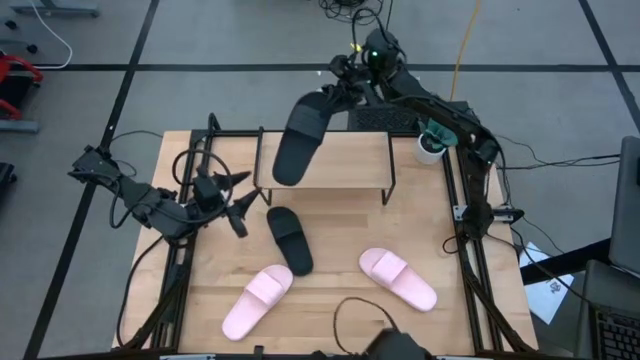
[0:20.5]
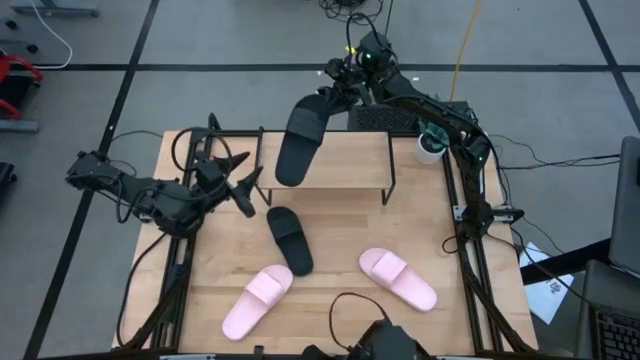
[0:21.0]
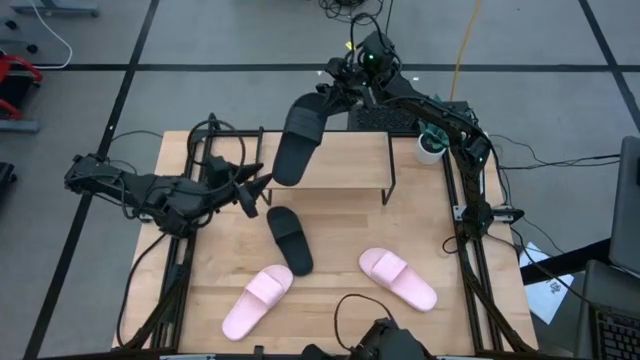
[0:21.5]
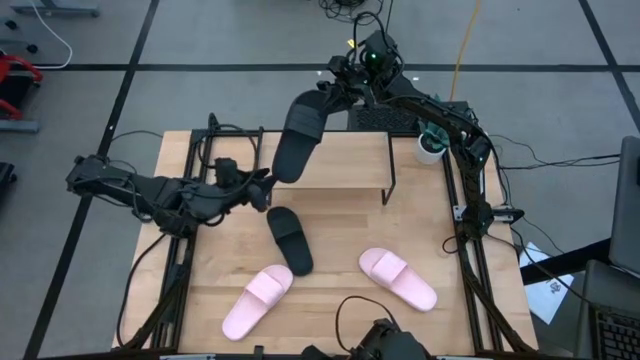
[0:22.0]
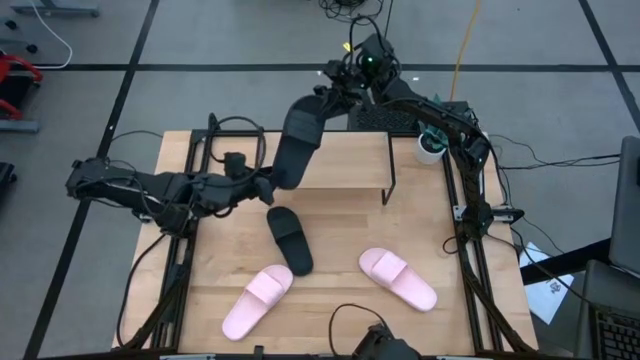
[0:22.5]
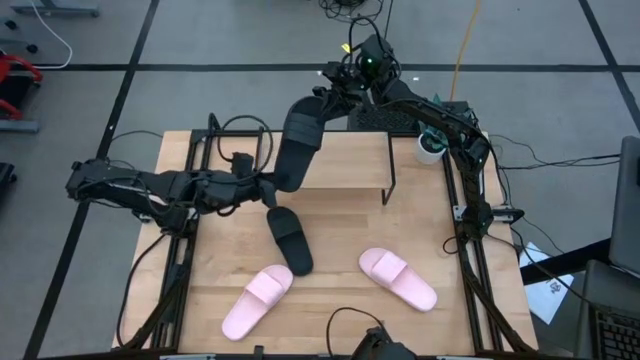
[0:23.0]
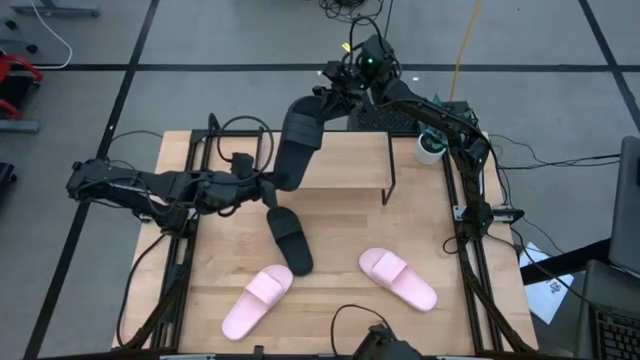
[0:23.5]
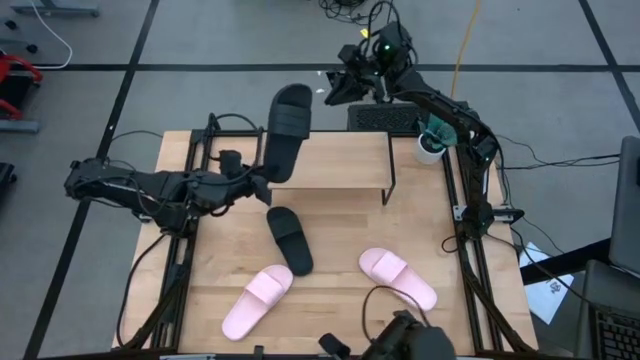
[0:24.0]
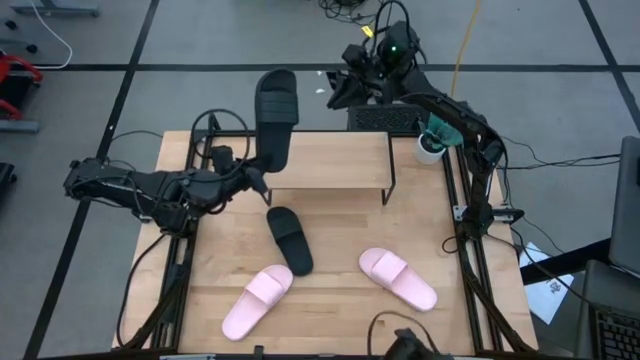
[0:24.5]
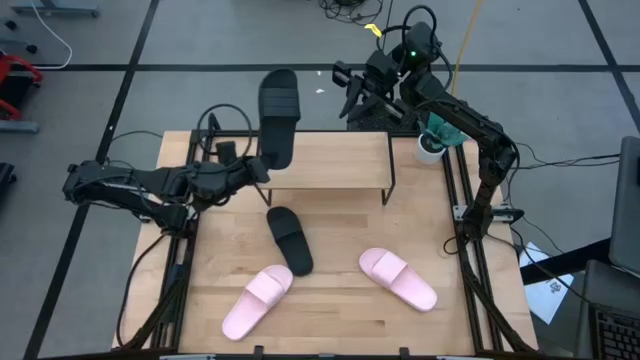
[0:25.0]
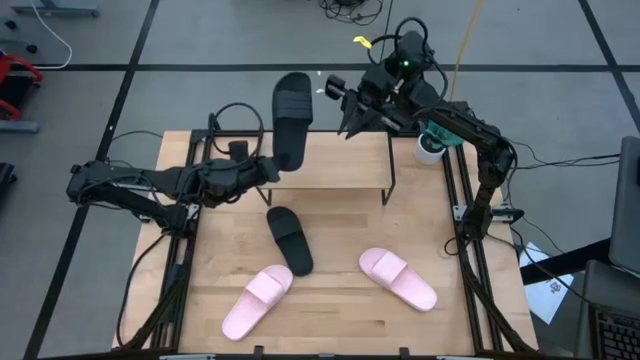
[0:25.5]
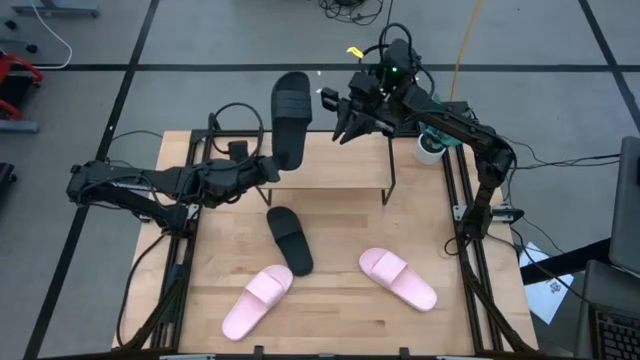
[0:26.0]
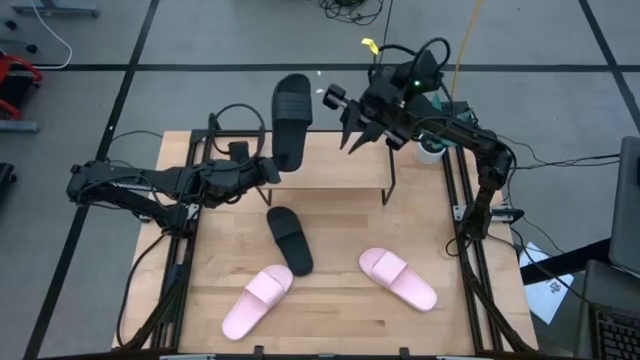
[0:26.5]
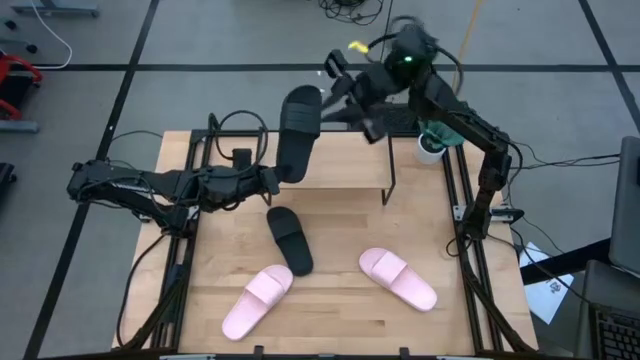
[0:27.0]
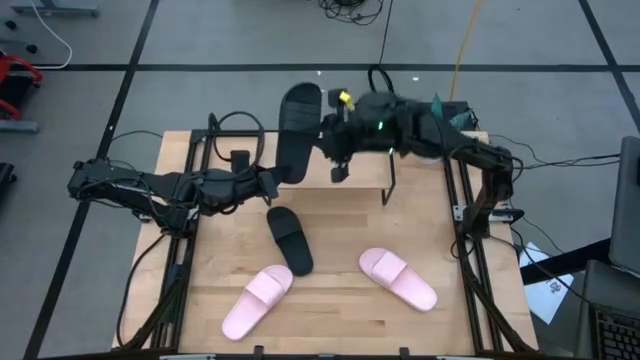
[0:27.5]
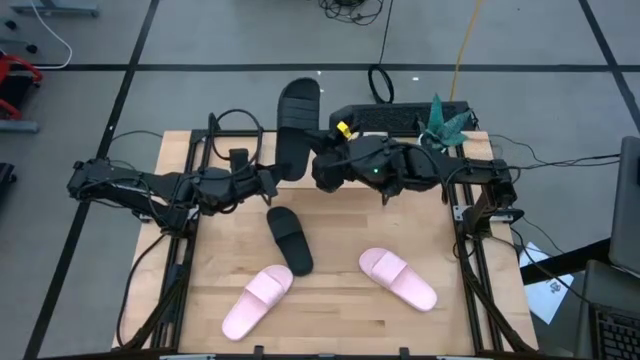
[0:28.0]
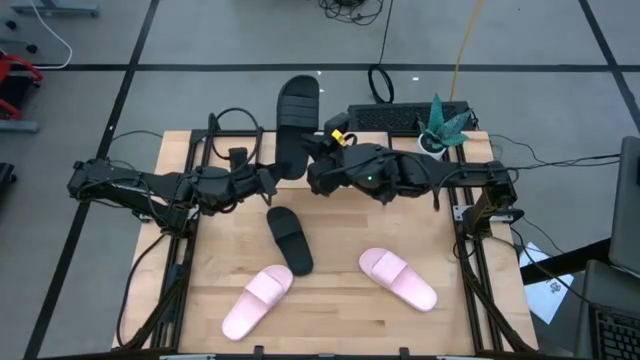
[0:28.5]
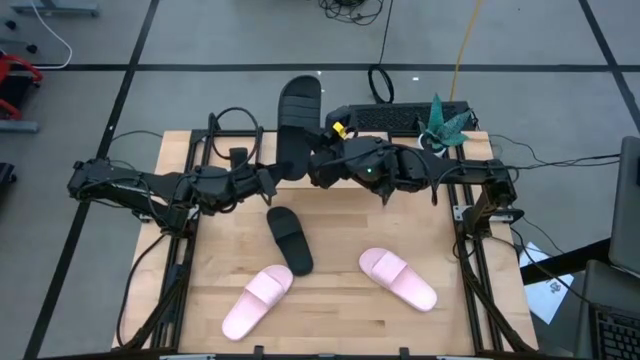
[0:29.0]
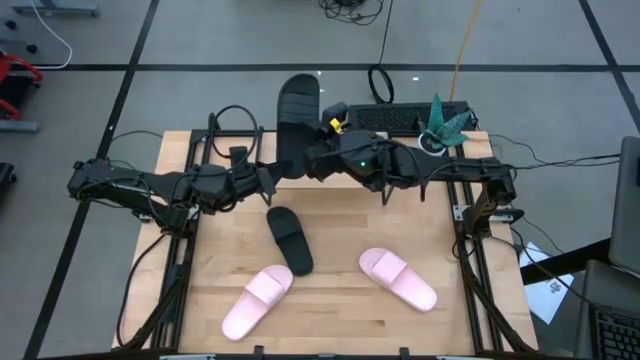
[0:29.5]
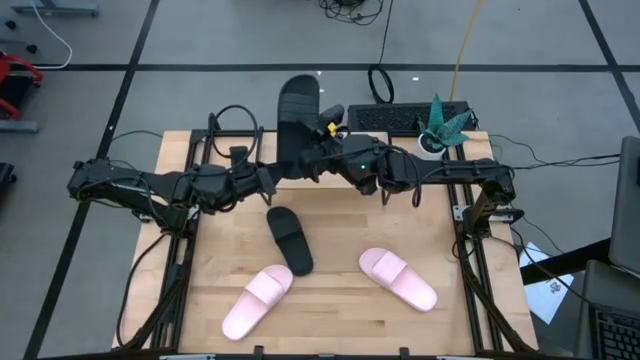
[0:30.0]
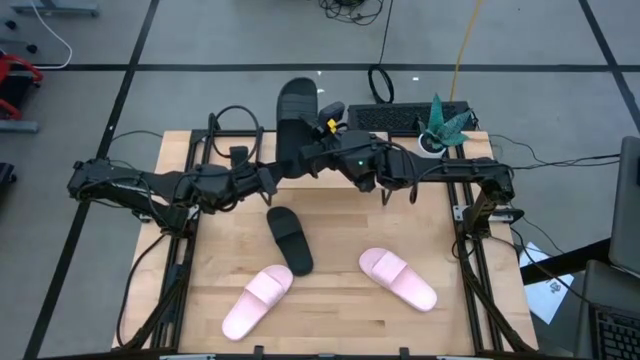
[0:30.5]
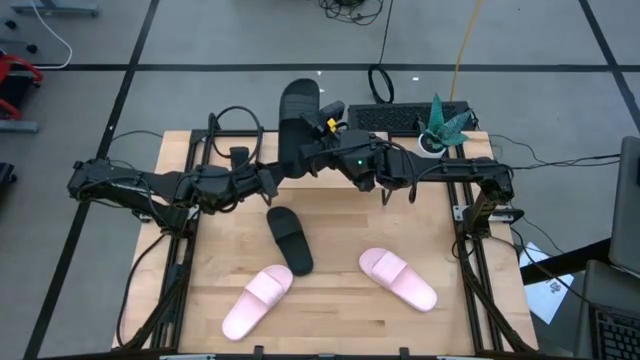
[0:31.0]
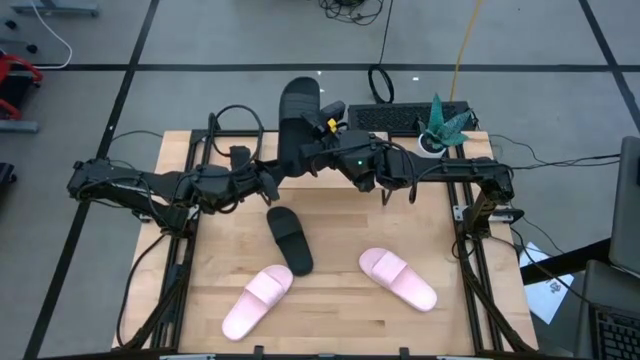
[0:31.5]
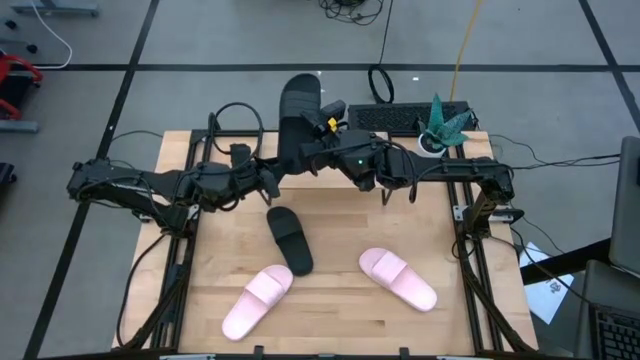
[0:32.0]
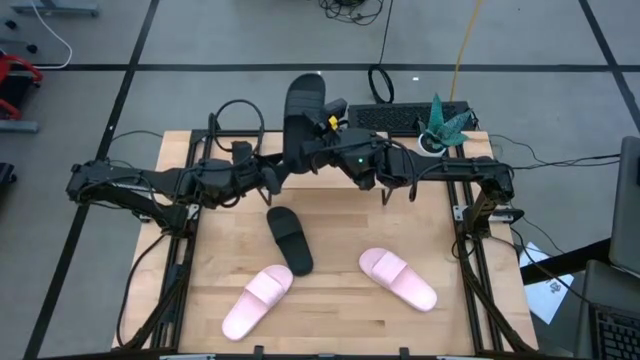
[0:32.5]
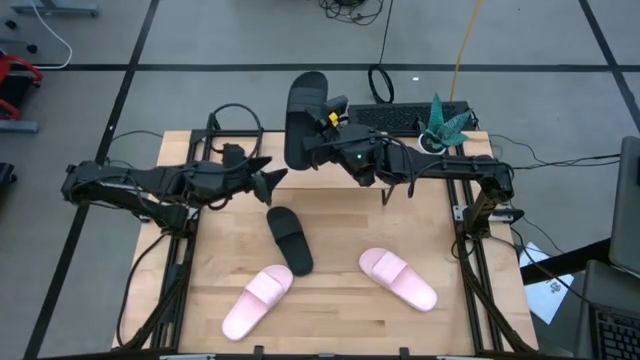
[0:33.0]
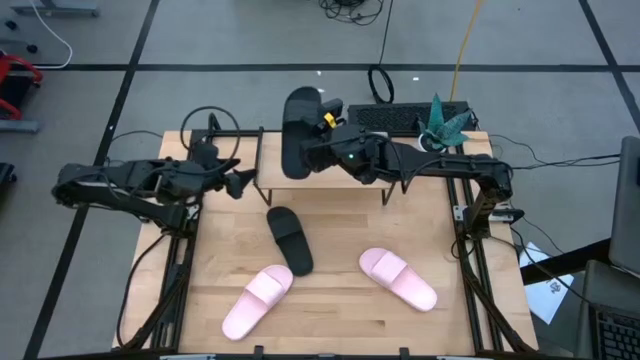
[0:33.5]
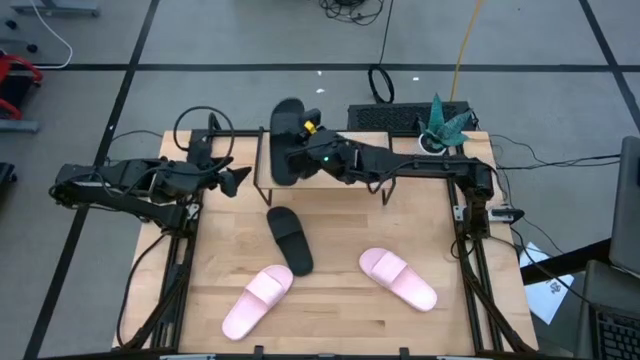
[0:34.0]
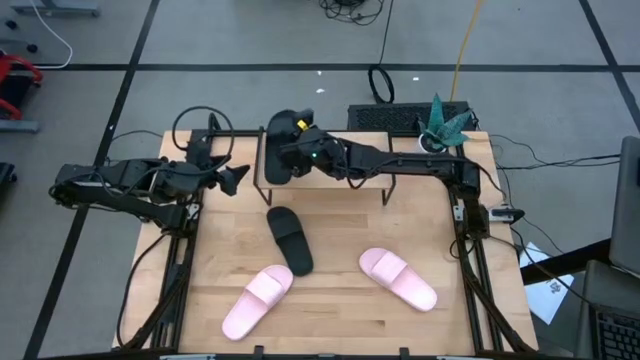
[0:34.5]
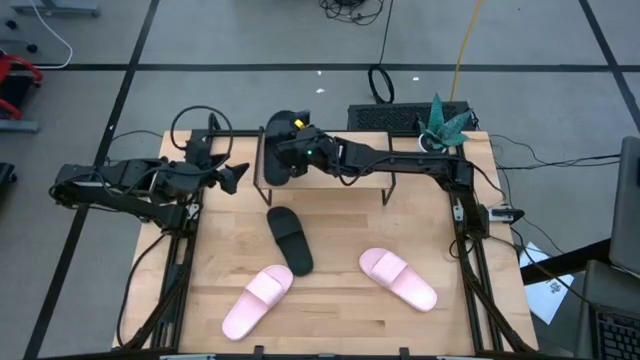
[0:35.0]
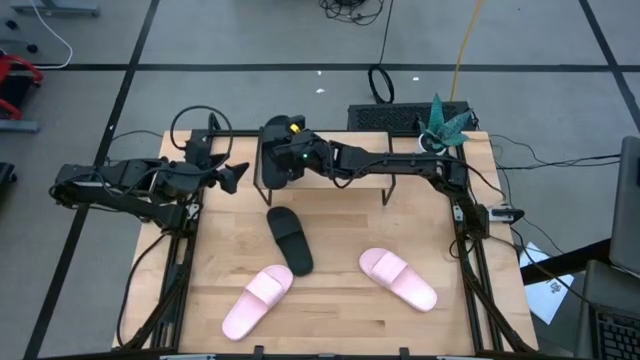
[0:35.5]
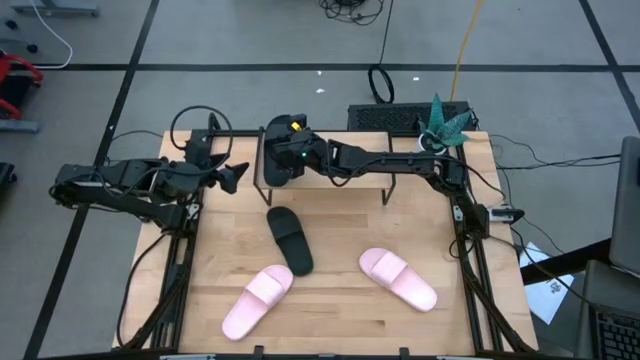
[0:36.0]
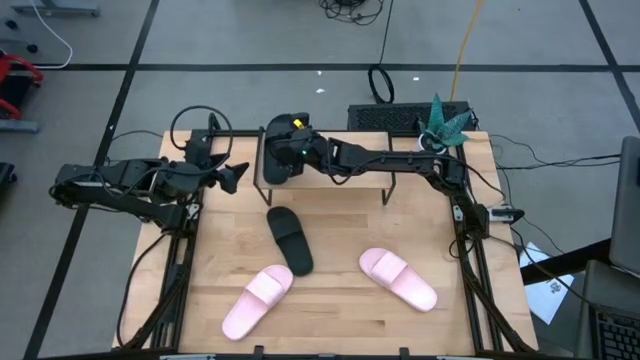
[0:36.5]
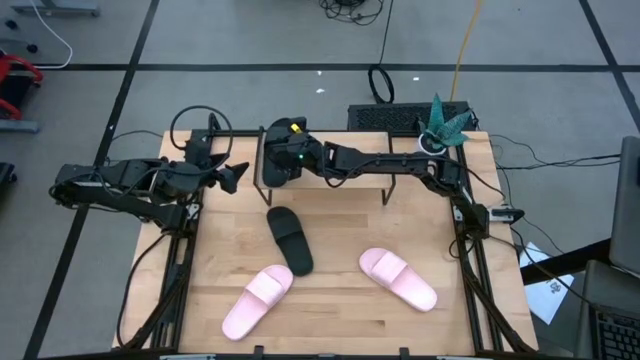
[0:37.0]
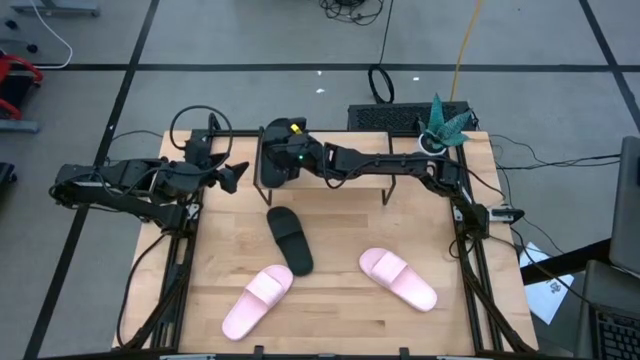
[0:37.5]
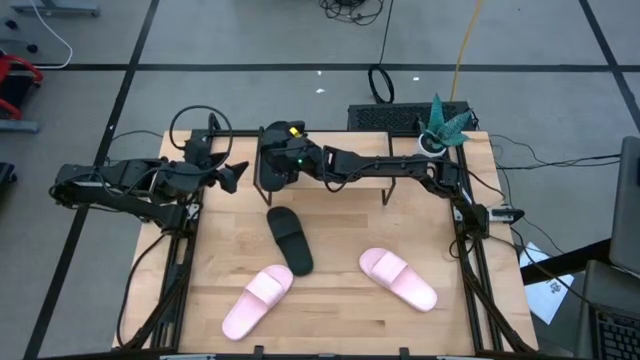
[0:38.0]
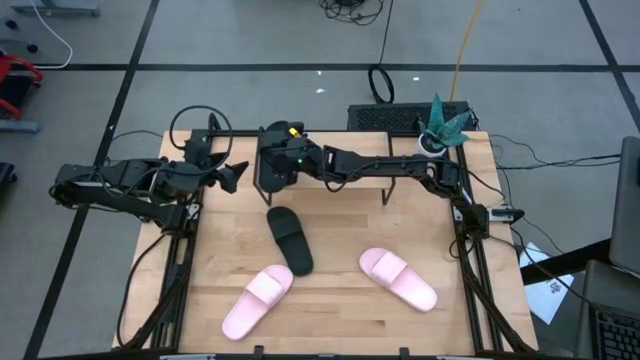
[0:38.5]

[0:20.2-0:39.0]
Task: Pick and place slides into the shelf
Put the right black slipper on the shelf

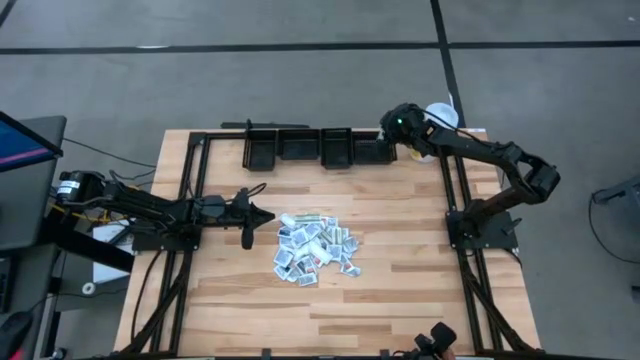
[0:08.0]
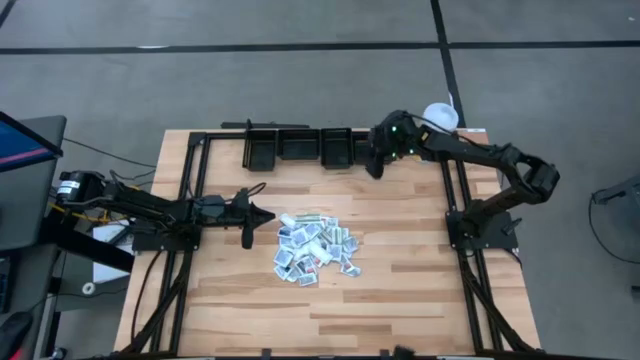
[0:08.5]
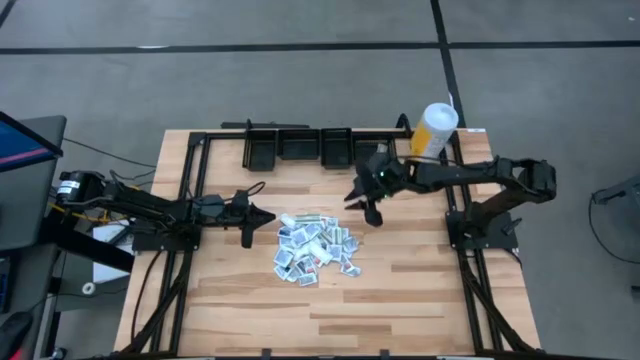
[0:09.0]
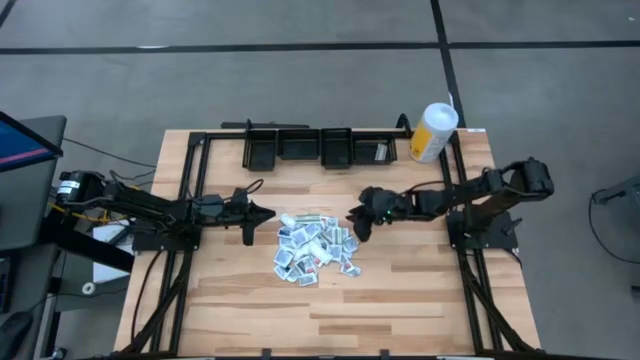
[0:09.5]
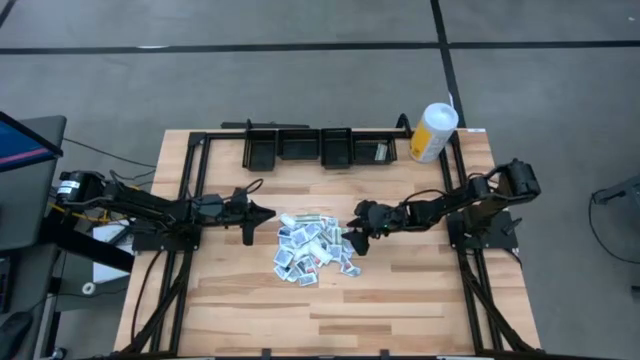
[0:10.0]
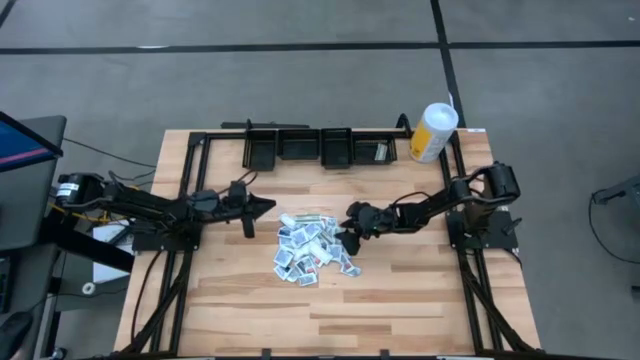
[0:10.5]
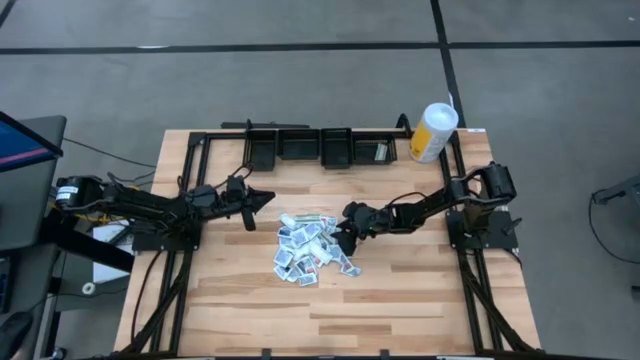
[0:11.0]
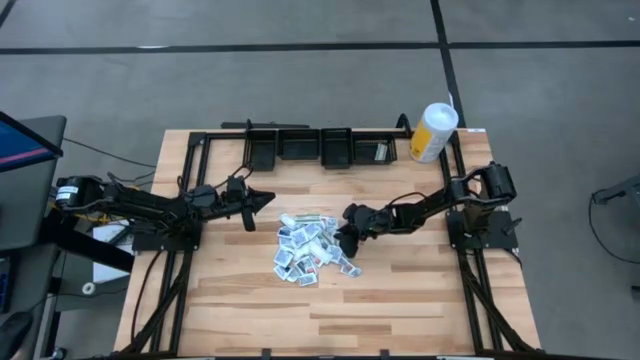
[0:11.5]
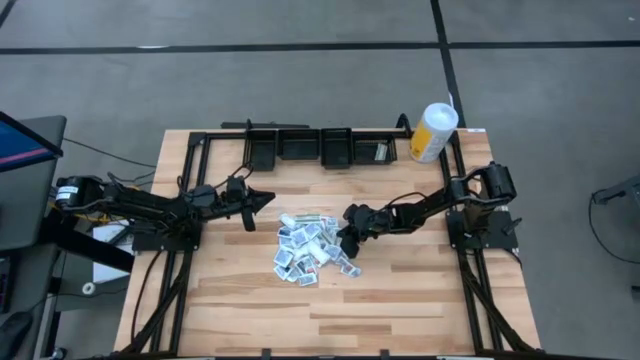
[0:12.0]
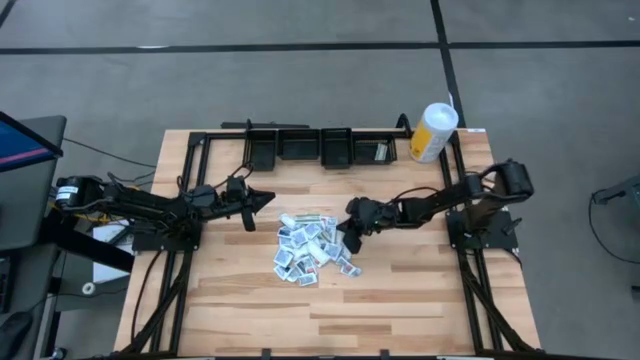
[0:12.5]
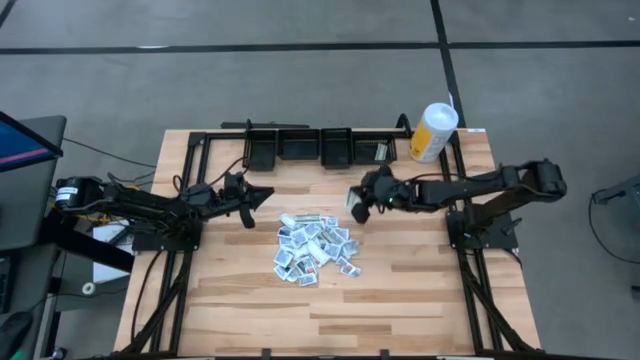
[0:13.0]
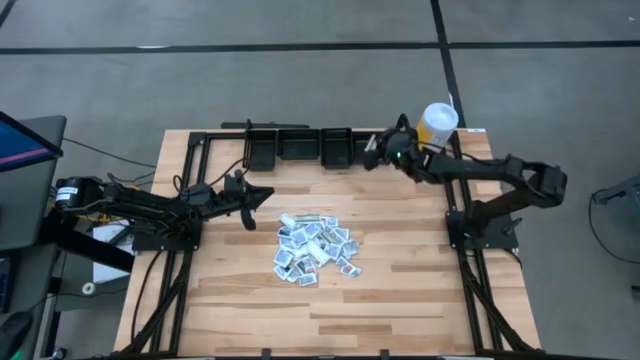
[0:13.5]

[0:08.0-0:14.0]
Task: Pick & Place First Aid Supplies
Put the green bandage pack into the right black bin
